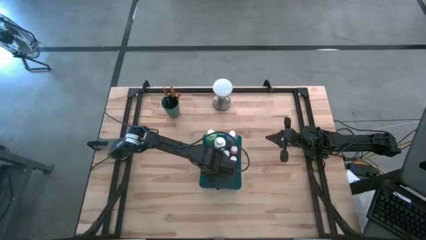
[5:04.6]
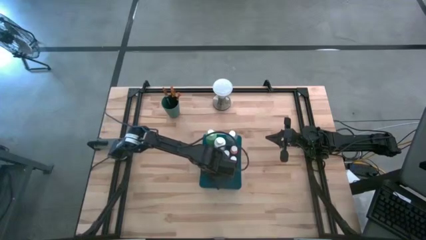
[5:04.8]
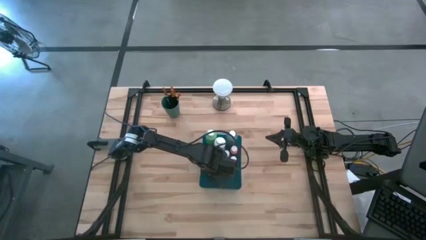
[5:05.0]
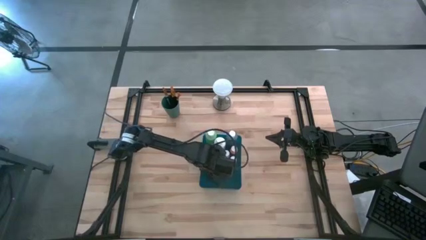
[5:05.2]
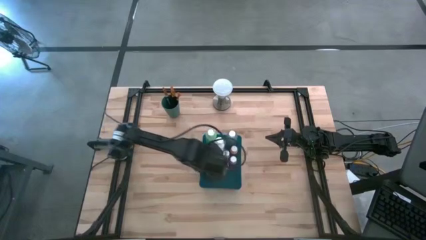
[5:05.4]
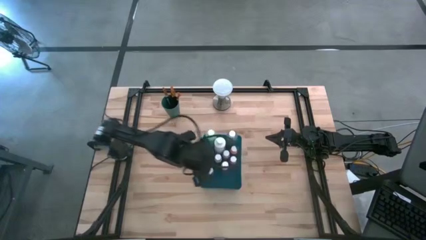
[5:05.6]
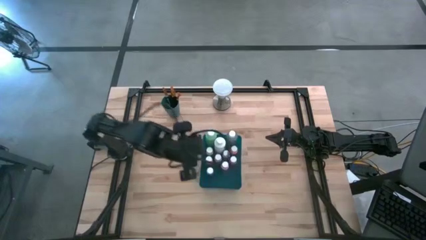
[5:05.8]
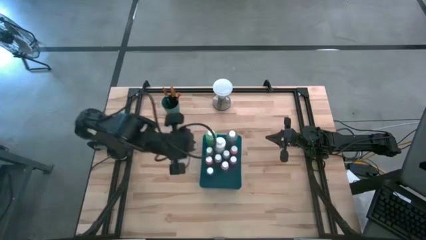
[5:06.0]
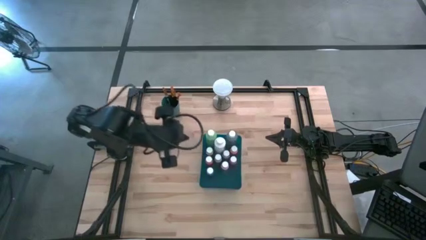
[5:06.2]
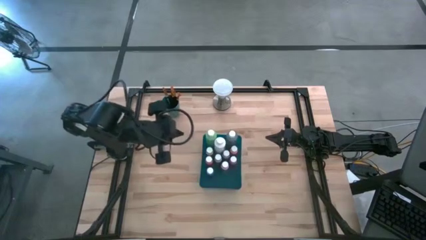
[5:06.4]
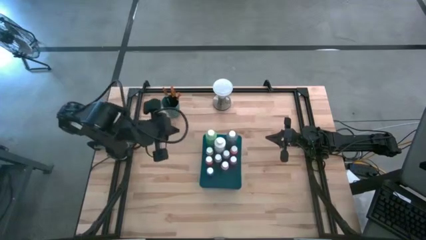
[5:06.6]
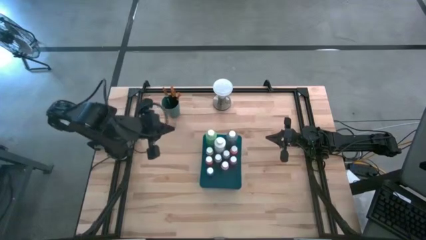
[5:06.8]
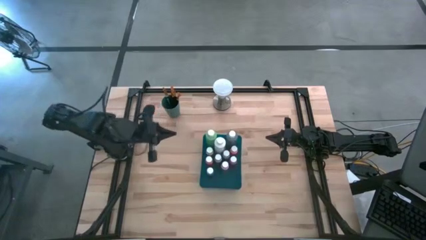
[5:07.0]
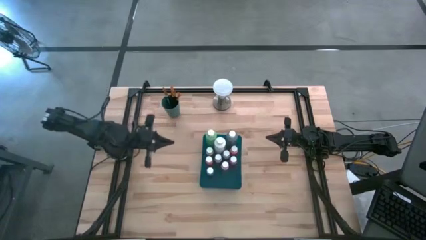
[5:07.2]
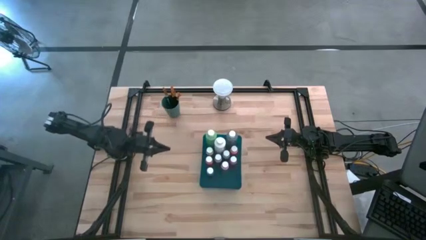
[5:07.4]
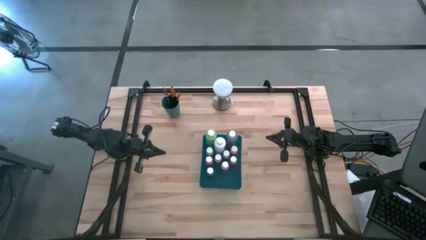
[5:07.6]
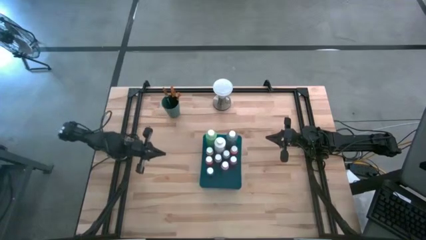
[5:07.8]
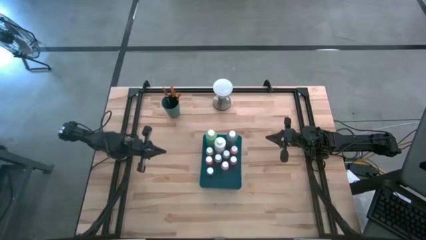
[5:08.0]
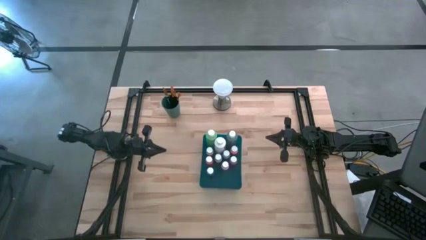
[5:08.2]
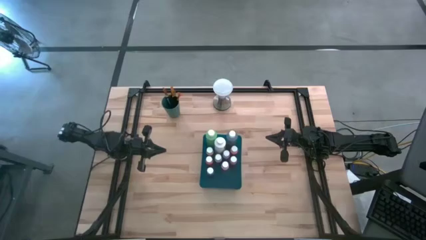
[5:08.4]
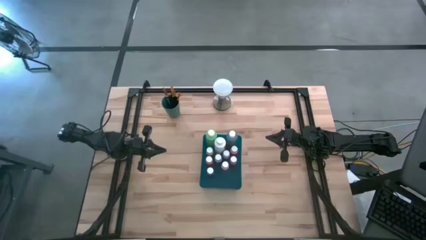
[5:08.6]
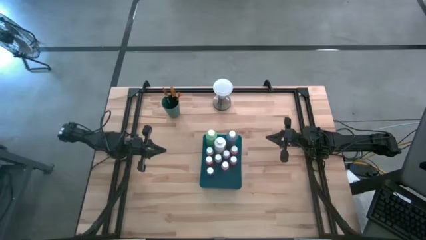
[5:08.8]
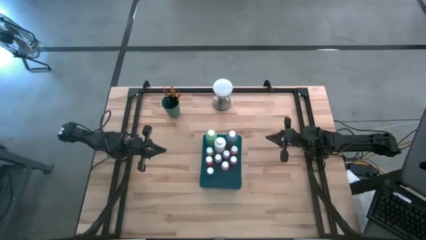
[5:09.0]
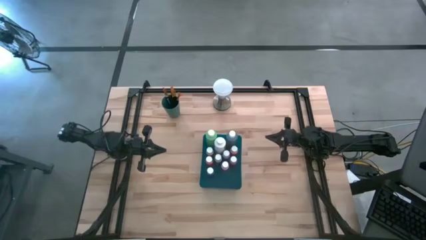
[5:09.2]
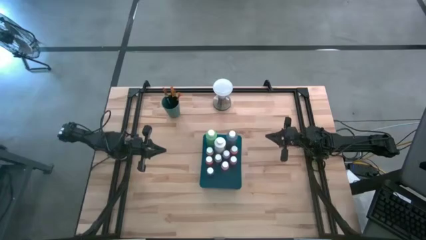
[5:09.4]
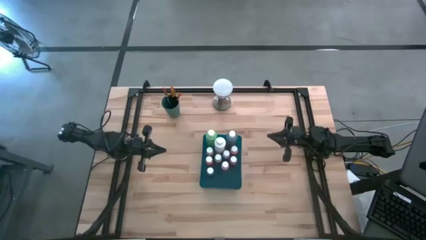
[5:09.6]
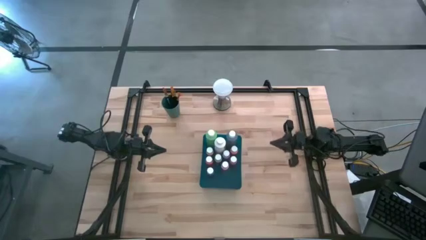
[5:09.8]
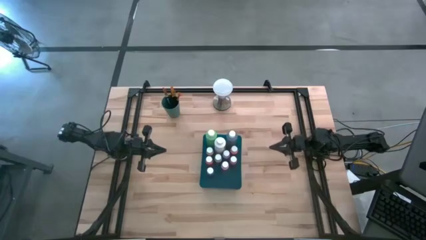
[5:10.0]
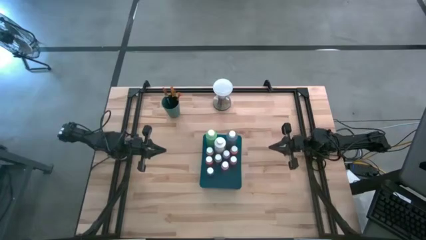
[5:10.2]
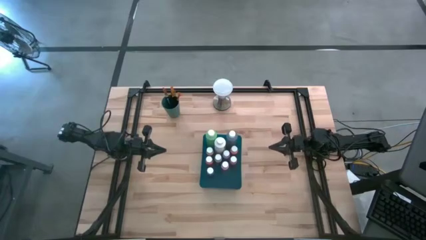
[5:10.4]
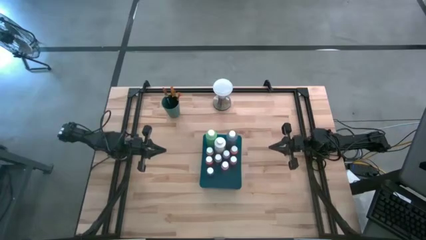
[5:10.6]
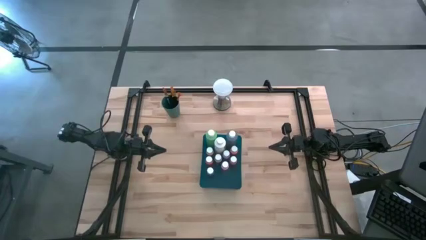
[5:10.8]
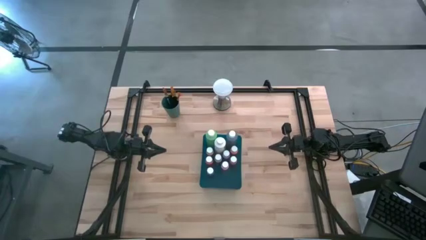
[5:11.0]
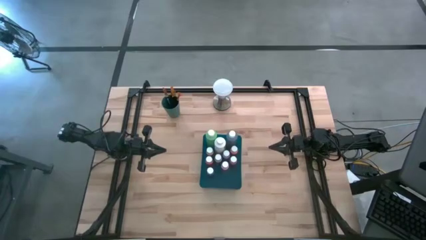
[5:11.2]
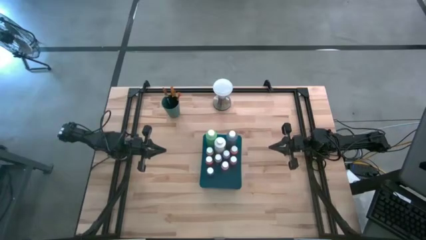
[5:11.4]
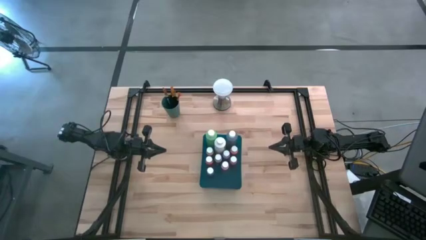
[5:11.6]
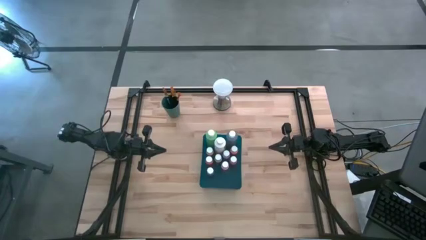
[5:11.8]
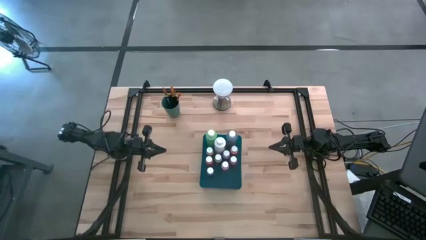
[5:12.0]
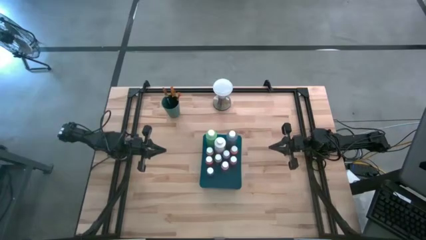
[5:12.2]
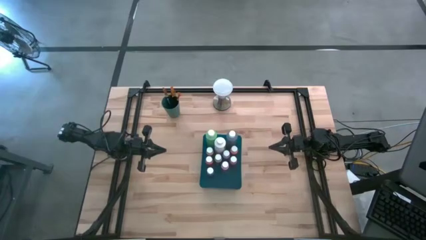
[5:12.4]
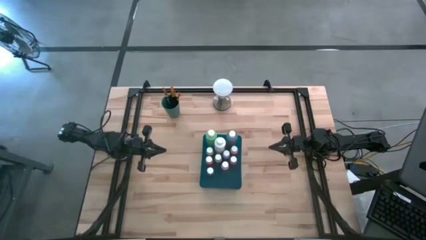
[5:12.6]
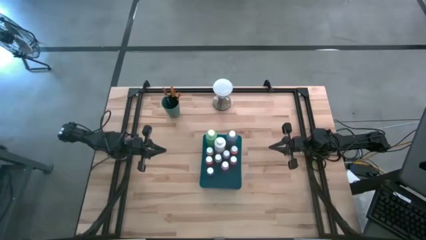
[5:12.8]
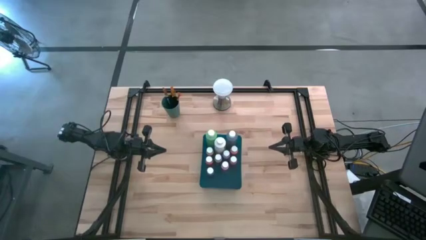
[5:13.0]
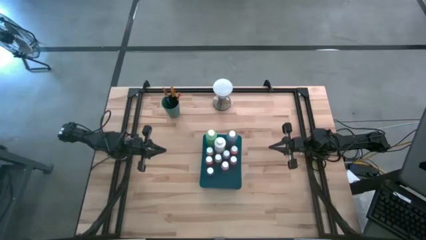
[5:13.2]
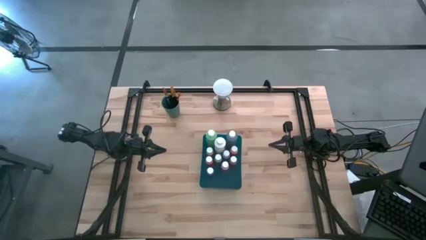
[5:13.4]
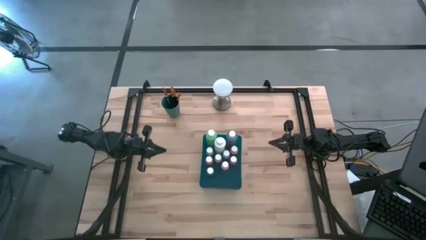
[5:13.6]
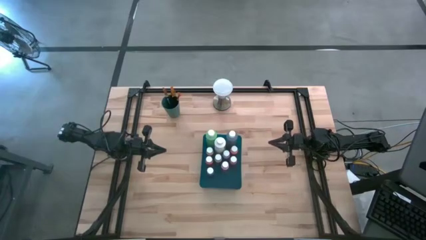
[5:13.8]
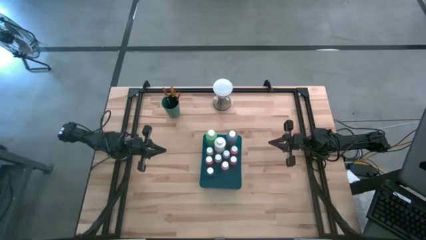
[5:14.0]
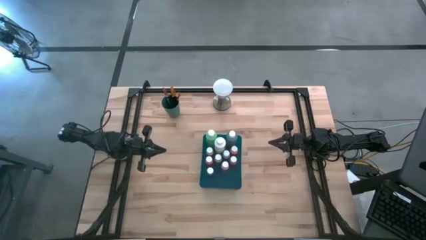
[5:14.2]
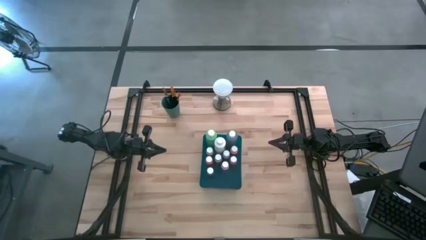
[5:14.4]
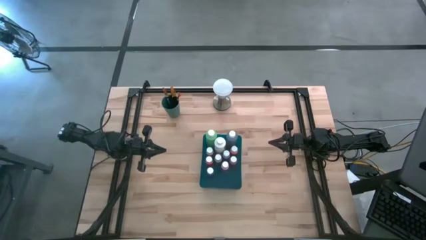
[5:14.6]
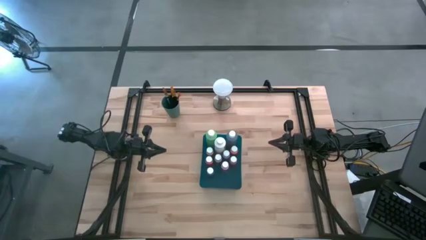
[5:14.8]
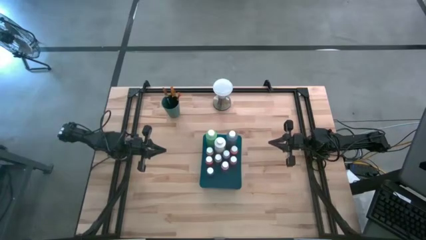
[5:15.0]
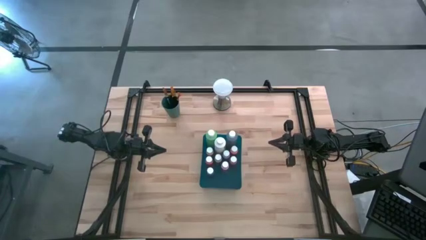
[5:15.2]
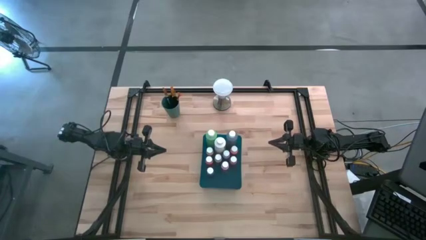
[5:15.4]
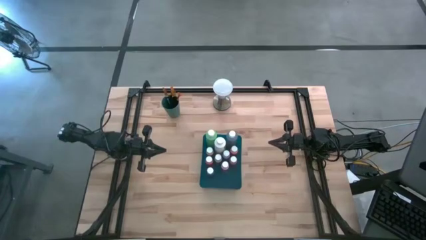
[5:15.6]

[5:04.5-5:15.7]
Task: Pick & Place Paint Supplies
Return to Home Position

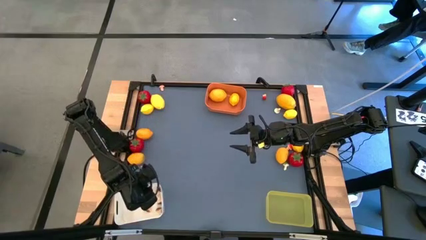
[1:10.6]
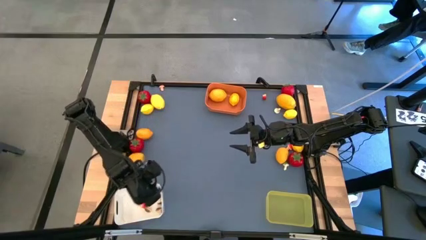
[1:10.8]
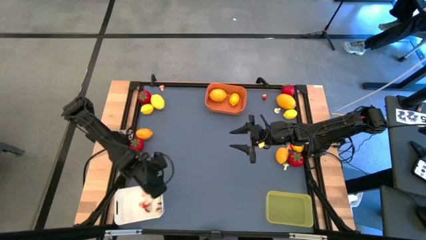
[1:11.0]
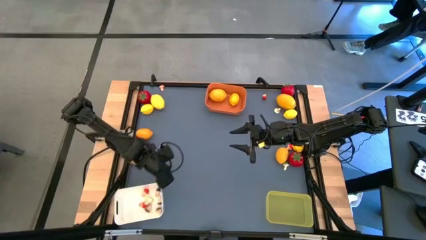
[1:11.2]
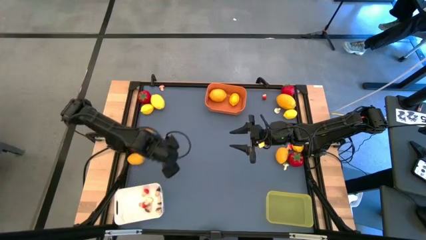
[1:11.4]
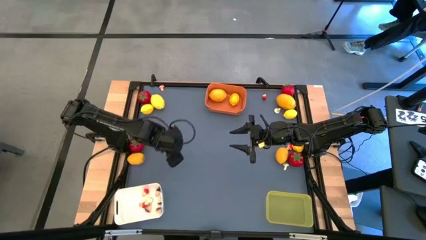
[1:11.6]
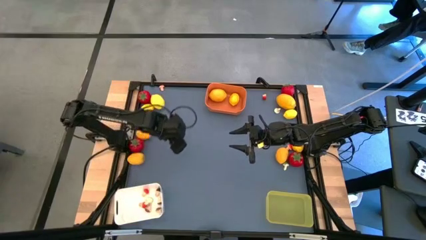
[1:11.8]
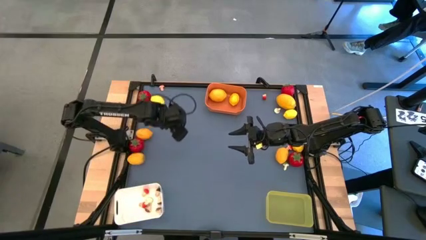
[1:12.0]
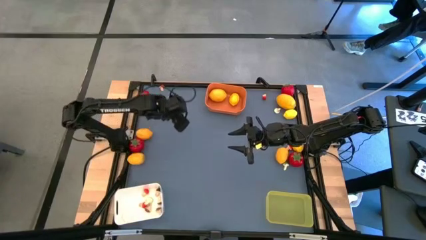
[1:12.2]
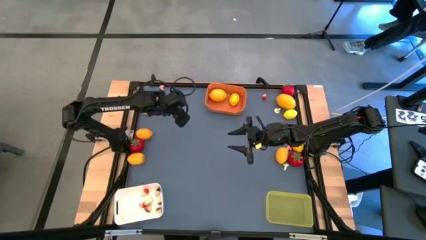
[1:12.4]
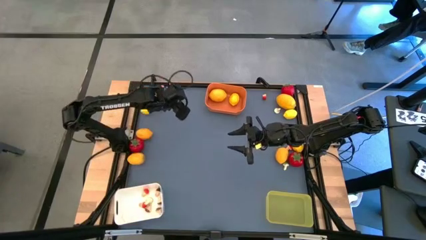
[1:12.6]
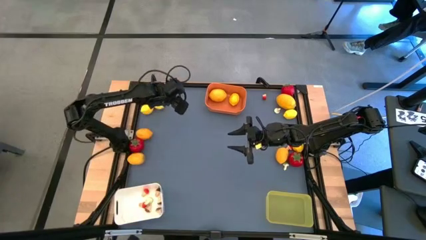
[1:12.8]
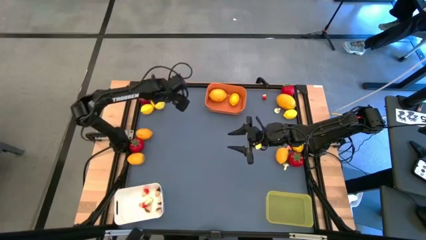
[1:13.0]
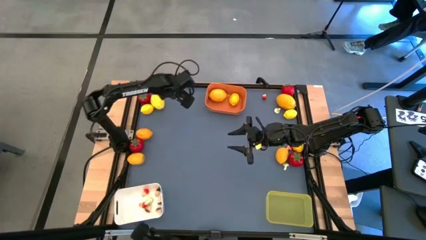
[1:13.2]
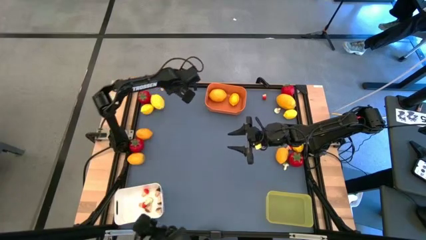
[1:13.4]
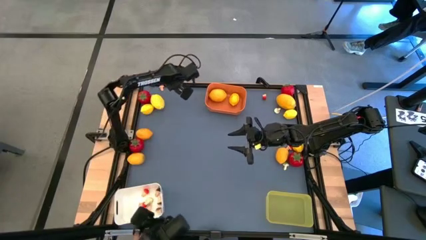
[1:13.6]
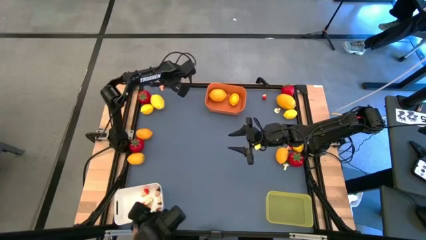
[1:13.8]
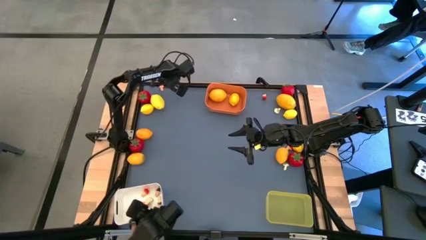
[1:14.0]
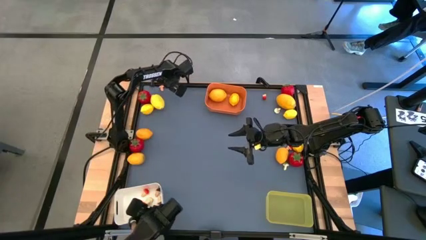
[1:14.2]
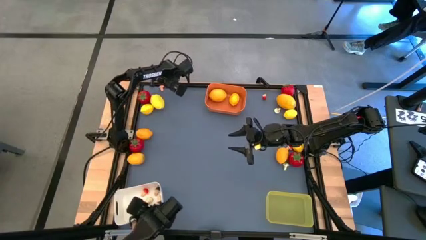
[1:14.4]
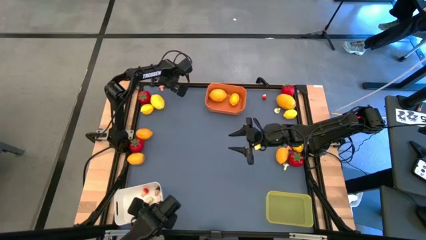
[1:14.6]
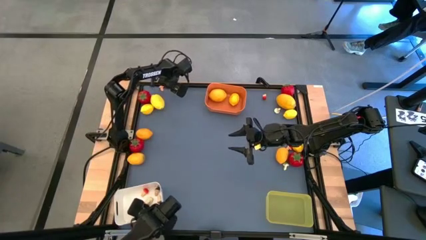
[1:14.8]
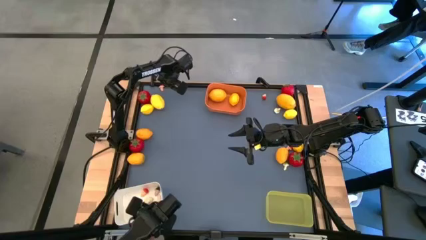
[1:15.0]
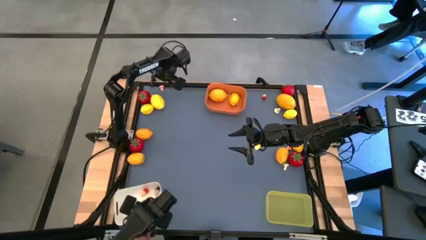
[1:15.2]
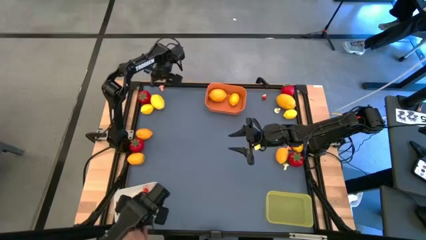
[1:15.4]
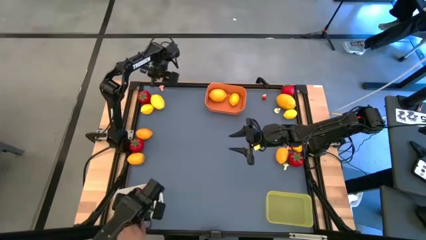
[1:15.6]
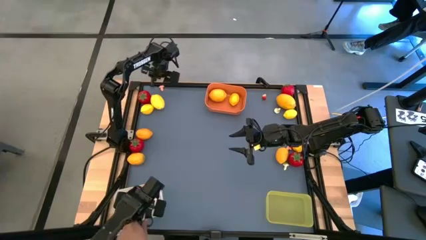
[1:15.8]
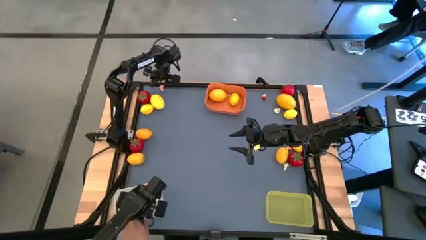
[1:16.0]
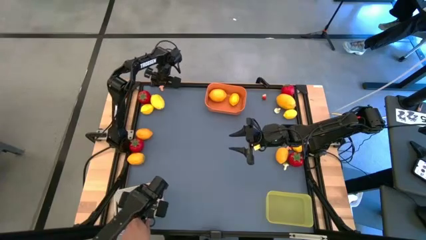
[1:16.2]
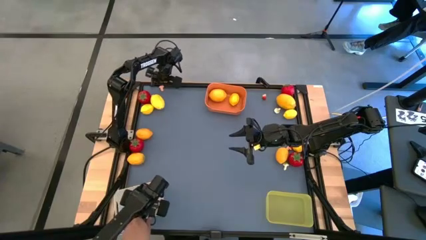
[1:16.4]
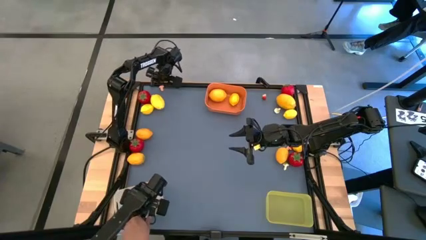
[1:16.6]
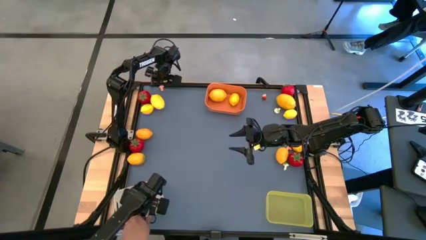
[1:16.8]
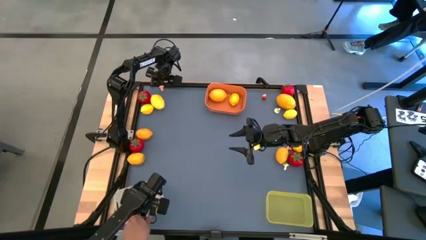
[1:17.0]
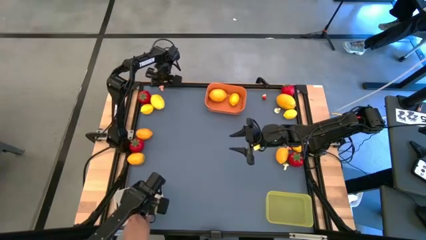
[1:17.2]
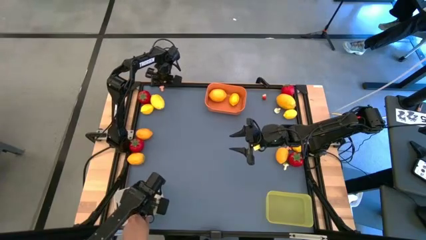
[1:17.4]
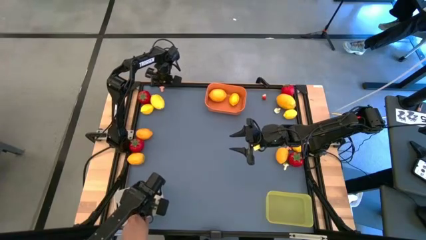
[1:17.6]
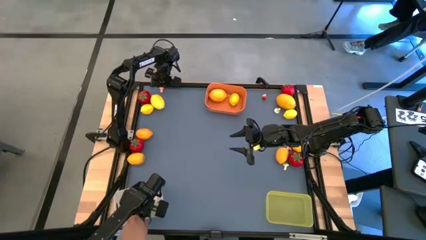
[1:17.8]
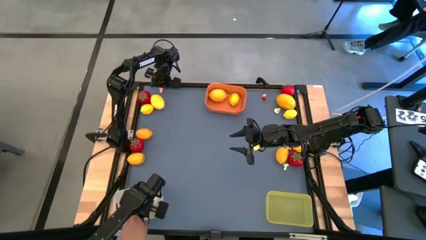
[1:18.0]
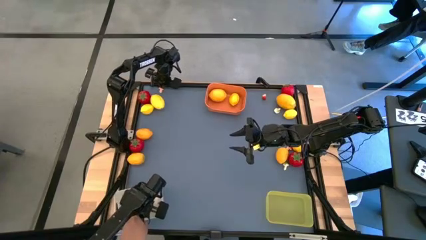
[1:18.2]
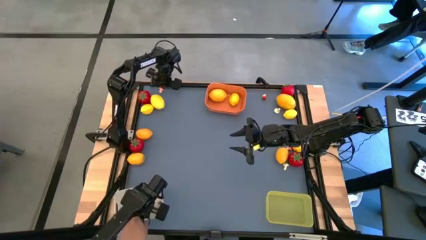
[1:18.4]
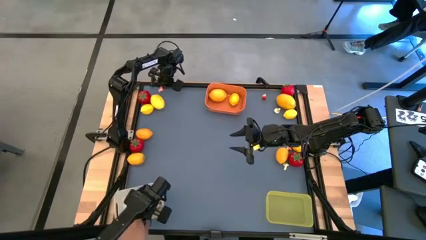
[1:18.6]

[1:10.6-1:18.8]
Task: Sort produce into baskets
Put the red mushroom into the white bin
